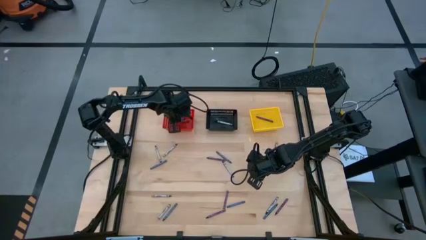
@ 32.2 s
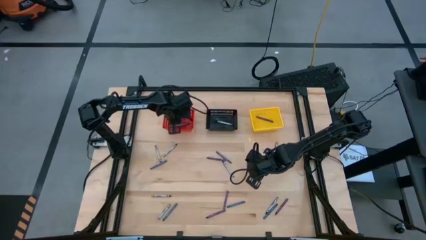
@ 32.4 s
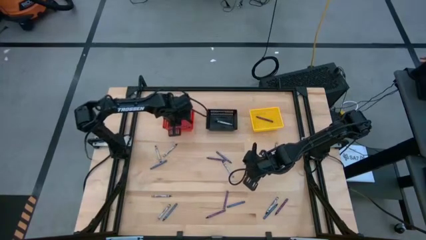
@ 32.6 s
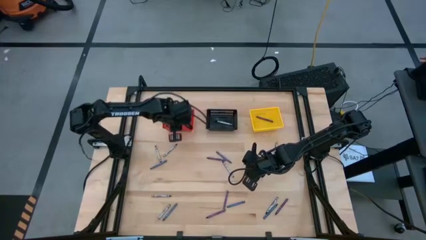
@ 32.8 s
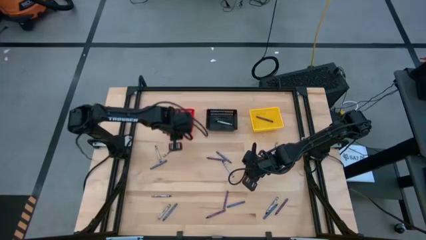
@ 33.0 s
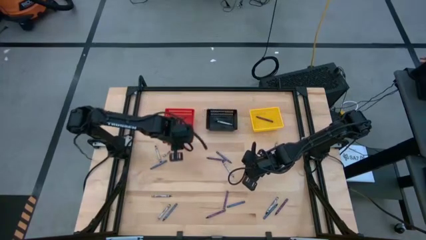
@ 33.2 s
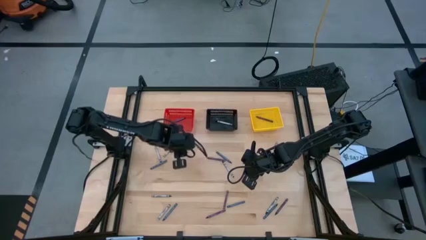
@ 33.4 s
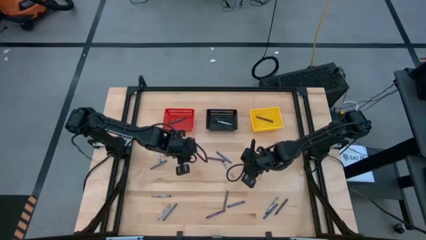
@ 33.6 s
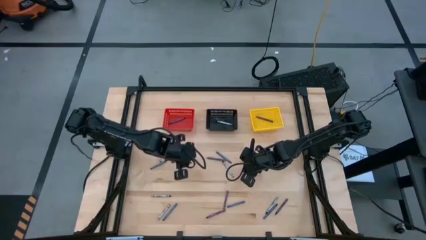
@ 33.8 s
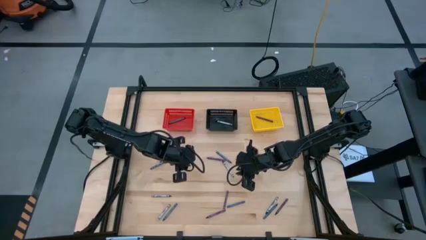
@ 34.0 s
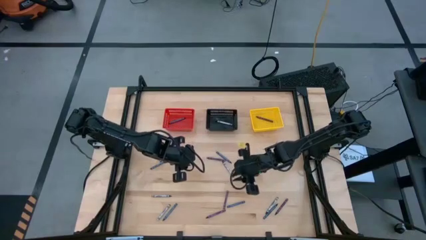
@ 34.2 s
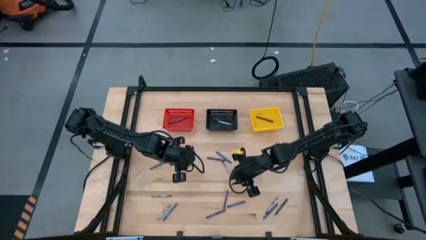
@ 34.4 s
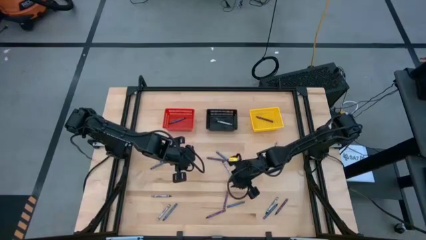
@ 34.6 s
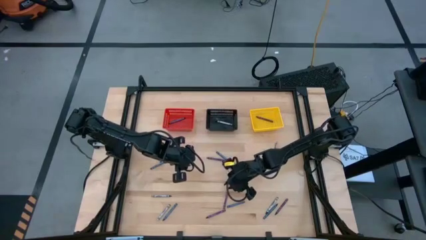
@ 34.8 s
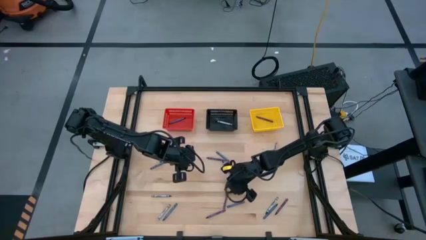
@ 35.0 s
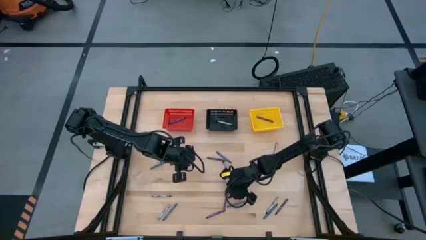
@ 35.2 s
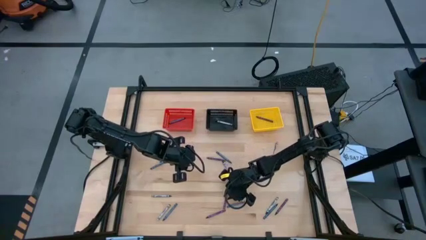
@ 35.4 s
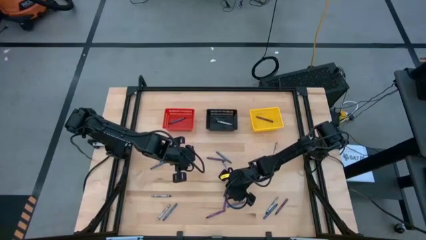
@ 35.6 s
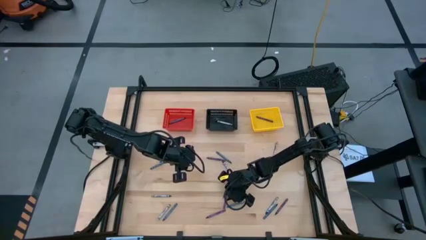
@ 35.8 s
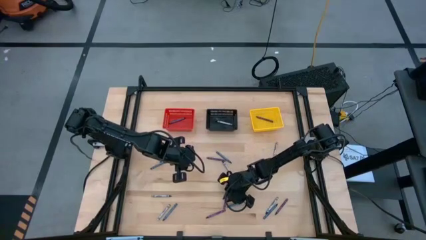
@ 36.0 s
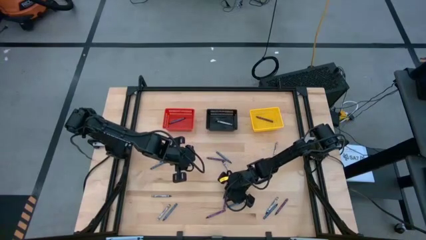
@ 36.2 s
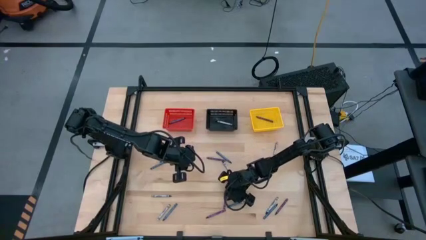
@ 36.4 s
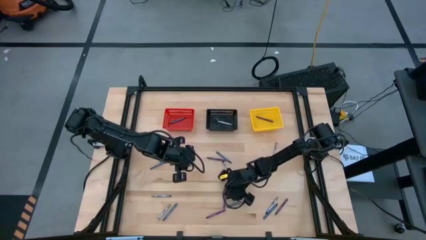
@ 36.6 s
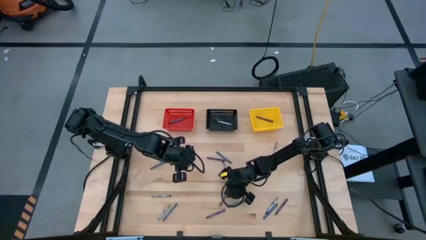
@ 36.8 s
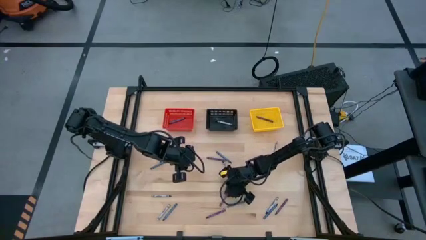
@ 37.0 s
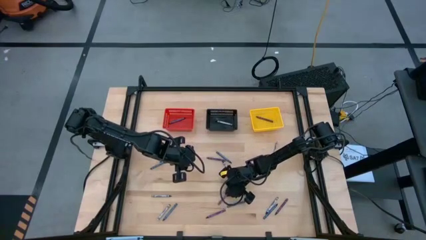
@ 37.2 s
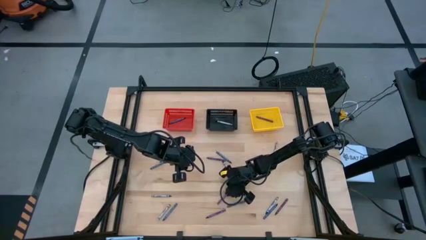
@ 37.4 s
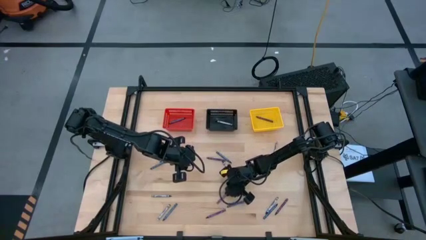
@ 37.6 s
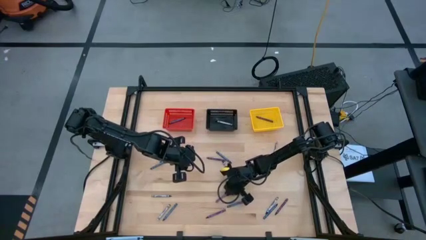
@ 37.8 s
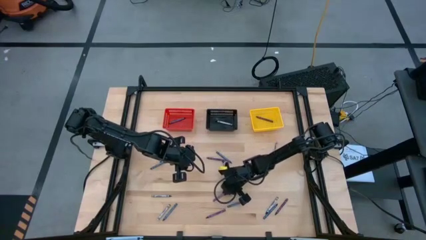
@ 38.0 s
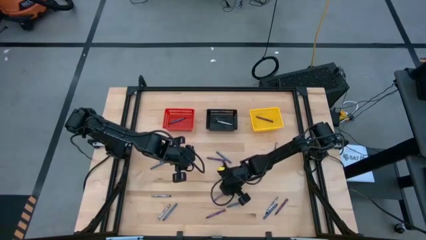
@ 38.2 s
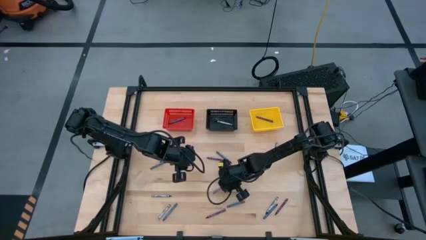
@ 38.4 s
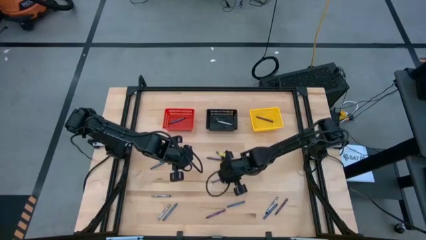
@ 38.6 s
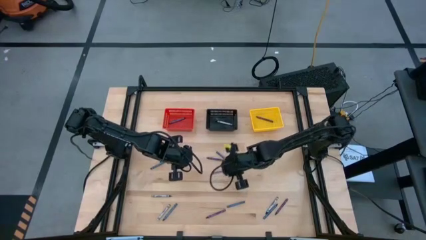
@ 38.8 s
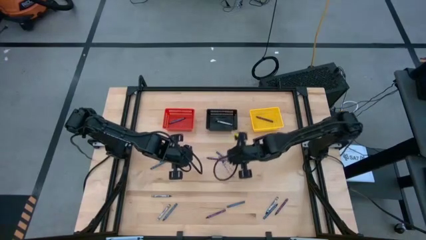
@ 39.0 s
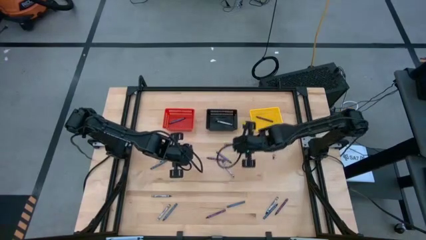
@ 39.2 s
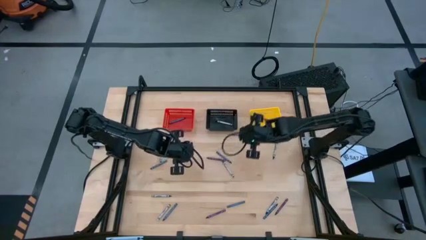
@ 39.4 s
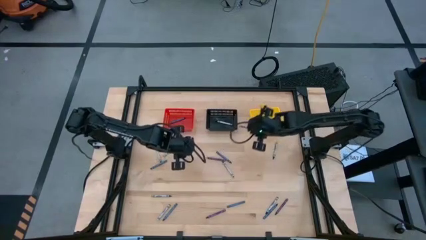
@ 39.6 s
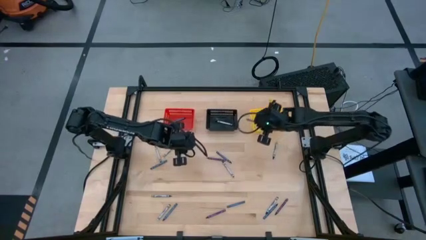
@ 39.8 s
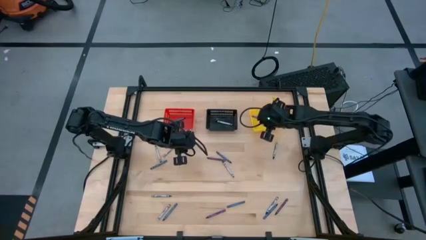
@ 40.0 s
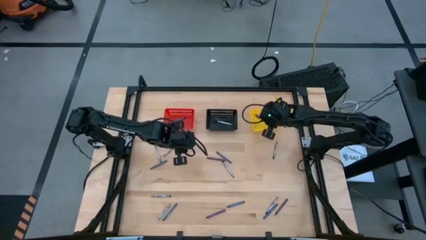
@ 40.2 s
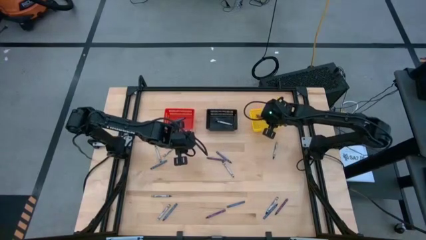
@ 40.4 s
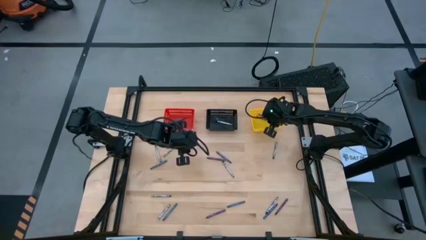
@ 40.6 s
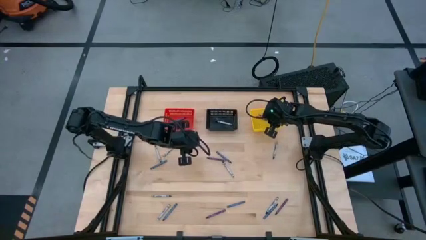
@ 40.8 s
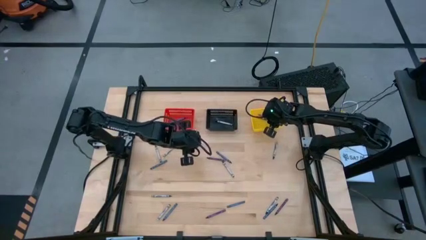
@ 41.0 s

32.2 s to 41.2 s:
Task: Sort crayons
Put the purple crayon into the yellow basket

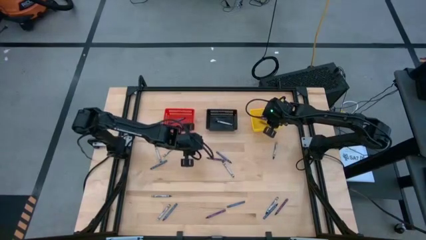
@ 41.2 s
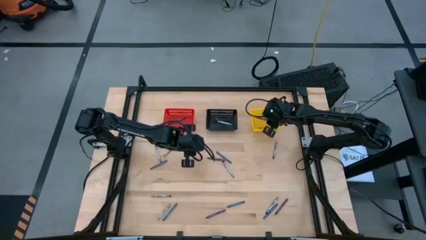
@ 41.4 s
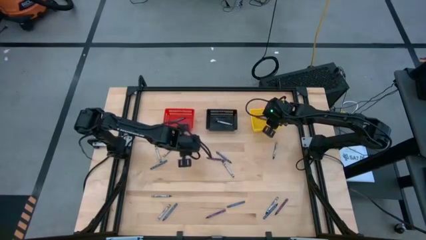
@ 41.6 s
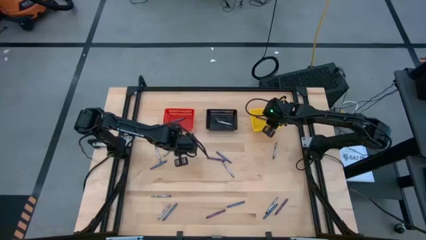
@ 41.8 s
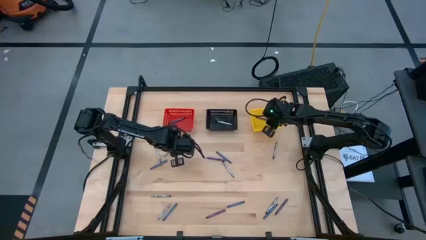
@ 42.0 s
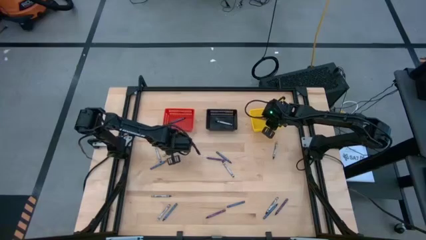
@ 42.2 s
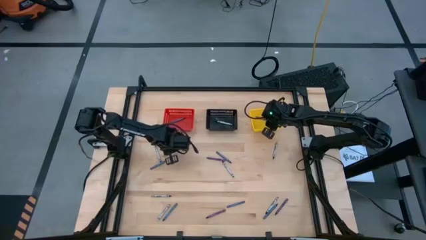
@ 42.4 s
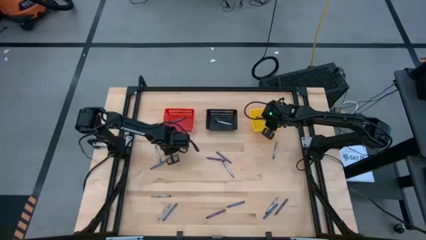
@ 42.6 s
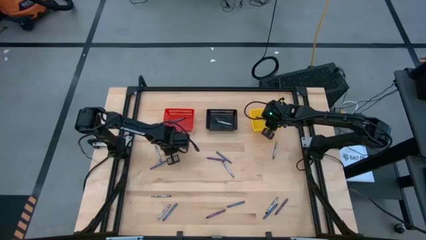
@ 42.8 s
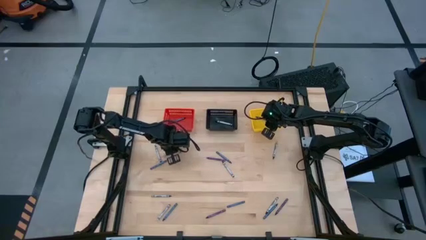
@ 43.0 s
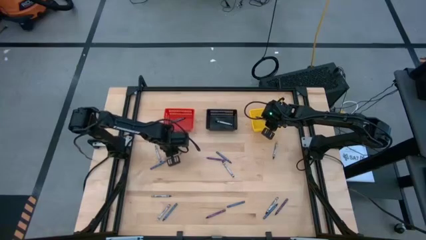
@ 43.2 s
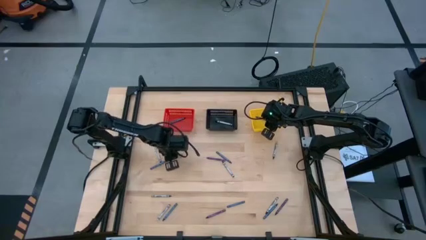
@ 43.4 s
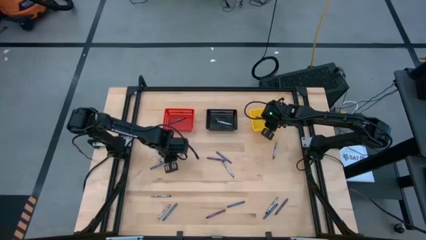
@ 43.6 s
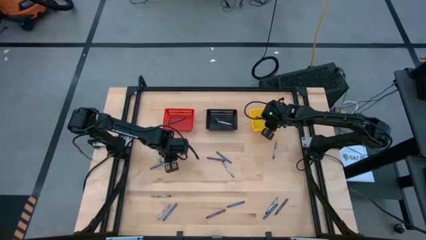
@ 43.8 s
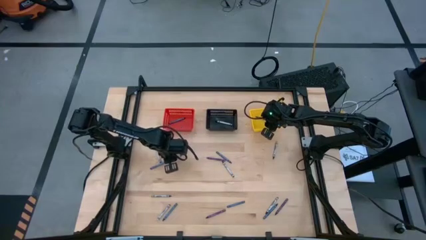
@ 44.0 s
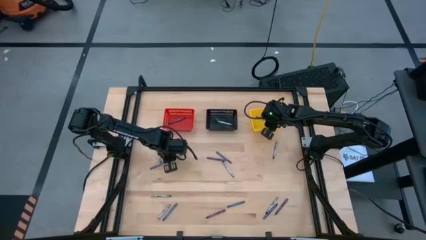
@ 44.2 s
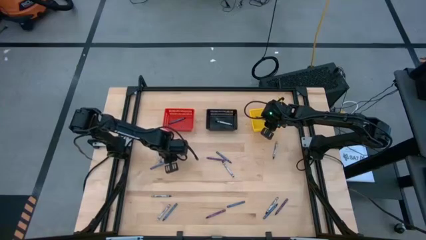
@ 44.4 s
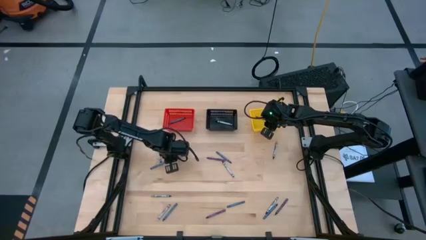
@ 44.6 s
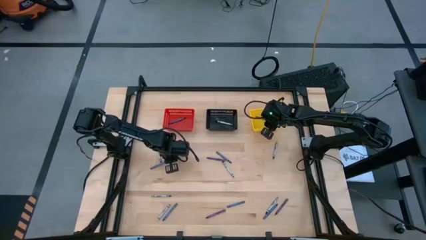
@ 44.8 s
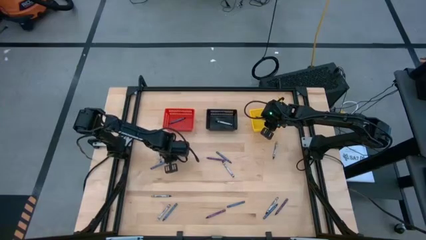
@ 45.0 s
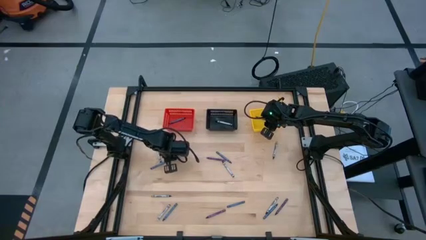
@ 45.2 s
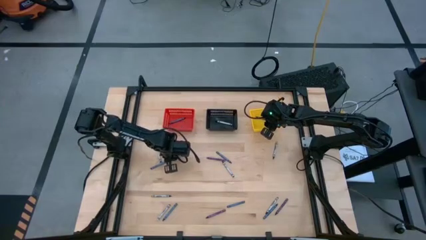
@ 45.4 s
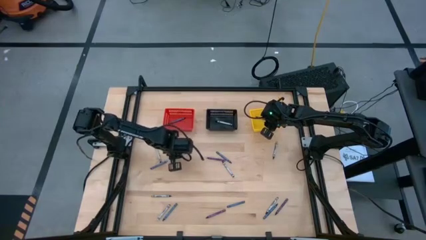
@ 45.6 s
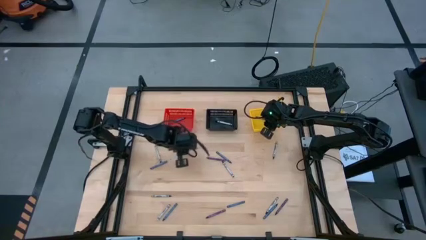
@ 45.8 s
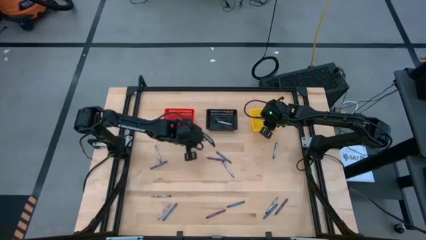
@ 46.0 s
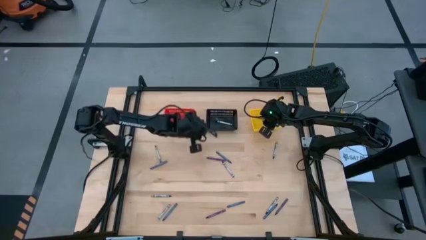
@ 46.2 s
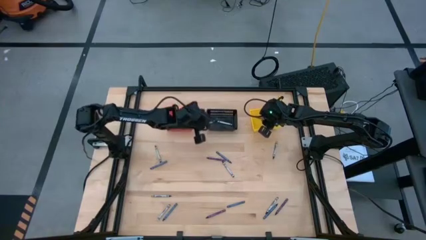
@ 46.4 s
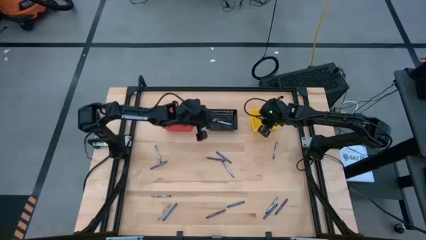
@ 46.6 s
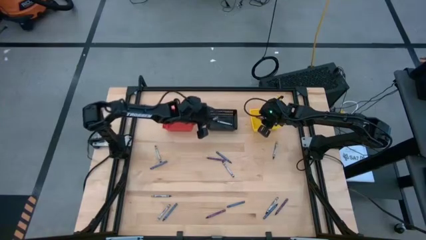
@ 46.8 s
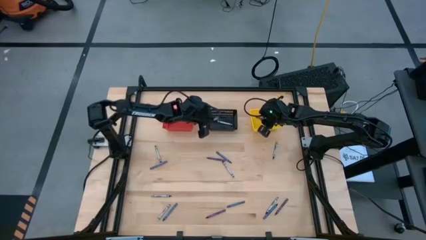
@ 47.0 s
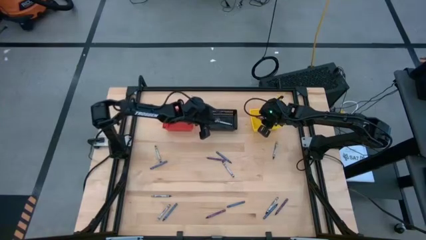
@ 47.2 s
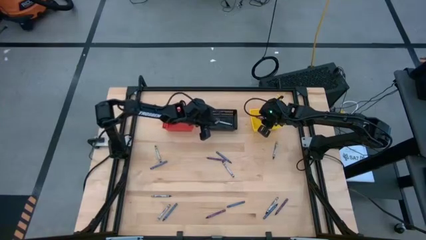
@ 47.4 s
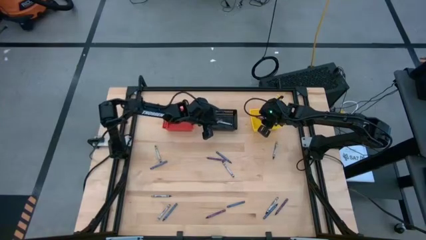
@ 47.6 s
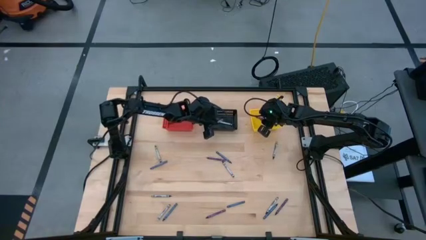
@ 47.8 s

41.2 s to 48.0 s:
Put the black crayon into the black basket
